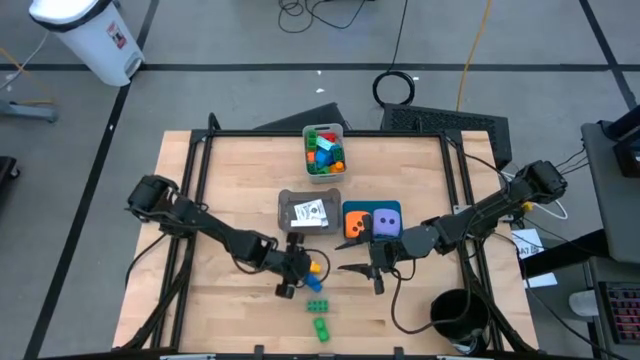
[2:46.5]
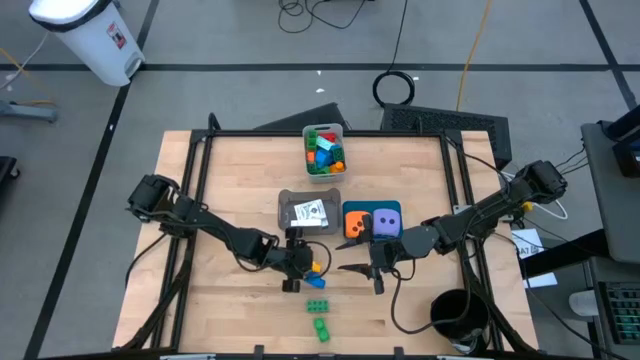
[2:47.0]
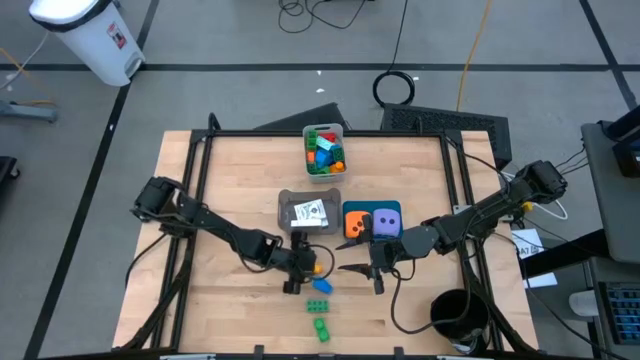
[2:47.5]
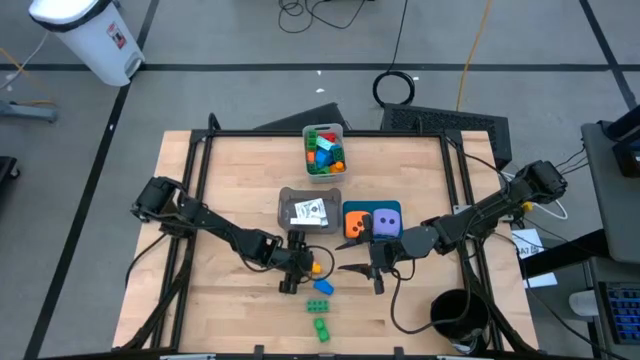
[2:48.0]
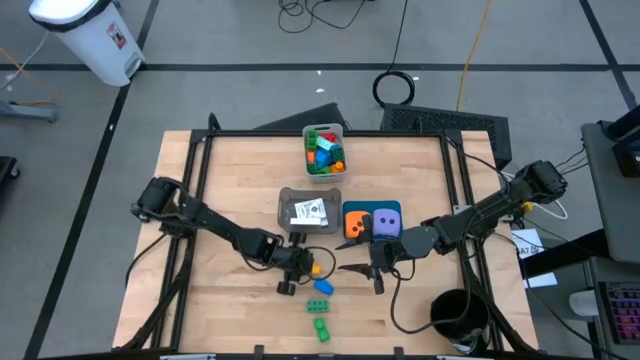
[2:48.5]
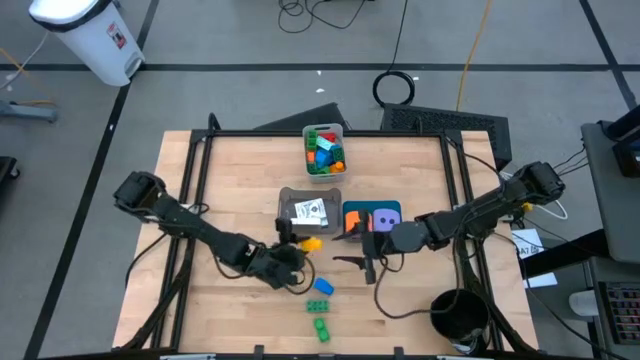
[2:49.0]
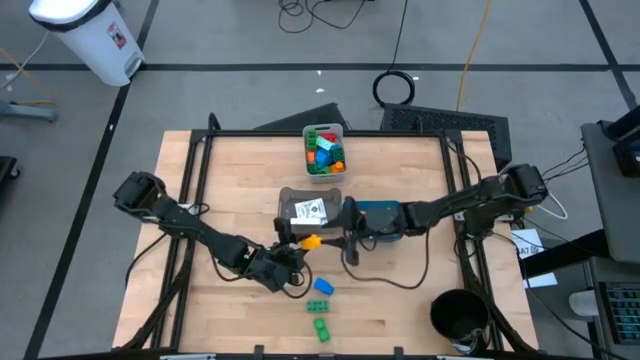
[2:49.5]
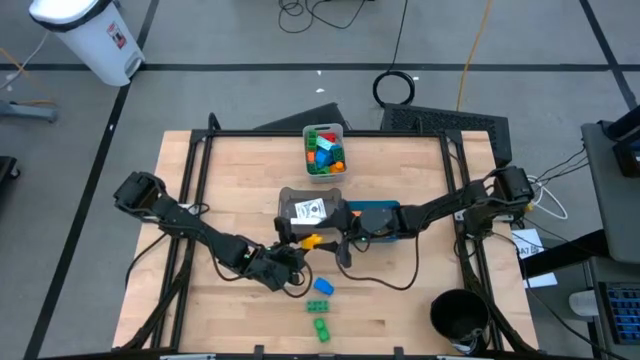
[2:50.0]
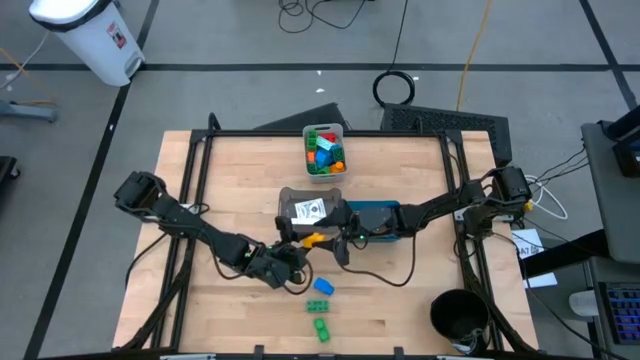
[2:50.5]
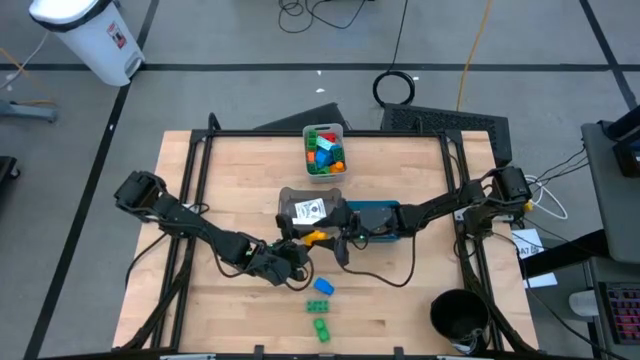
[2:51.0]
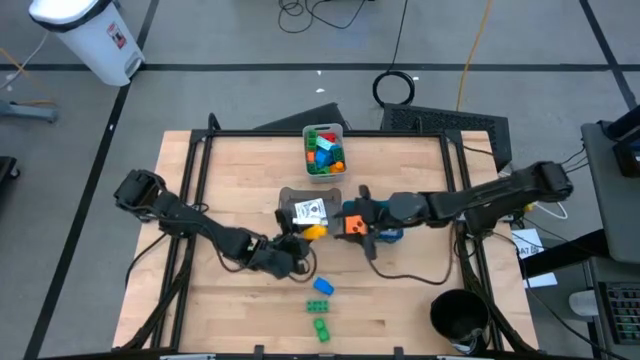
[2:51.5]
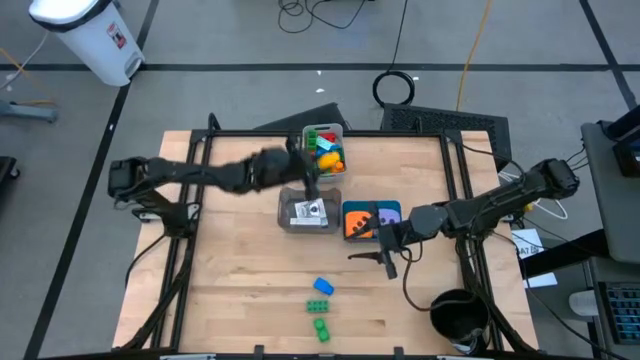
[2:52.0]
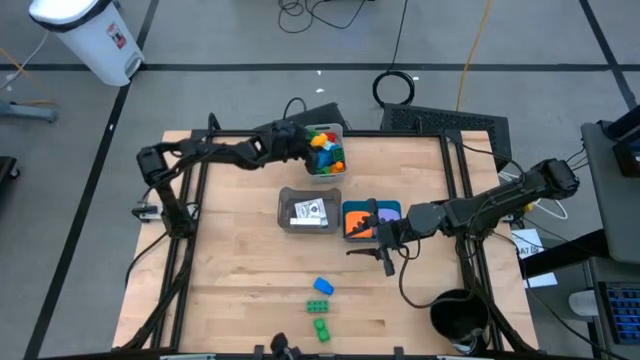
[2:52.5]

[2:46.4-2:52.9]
Task: Pick & Place Toys
Put the yellow game piece into the gray bin

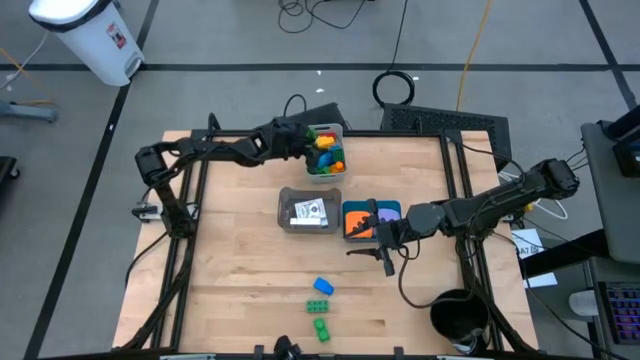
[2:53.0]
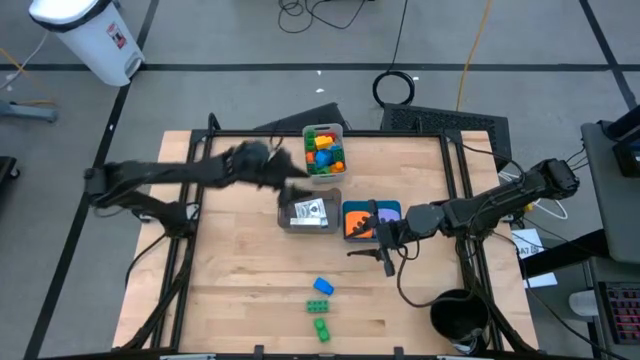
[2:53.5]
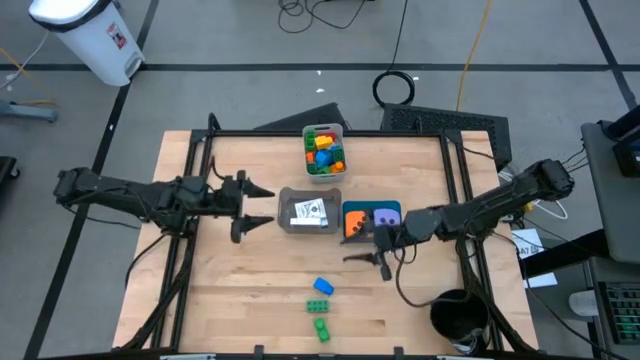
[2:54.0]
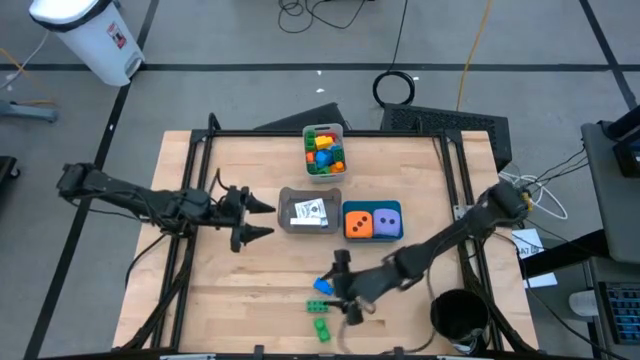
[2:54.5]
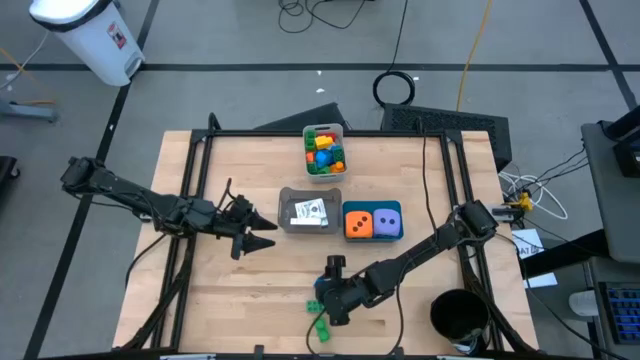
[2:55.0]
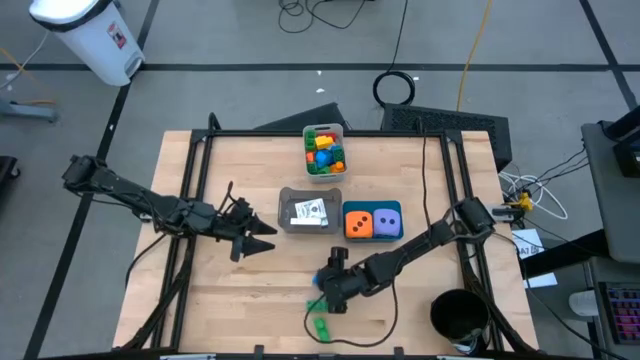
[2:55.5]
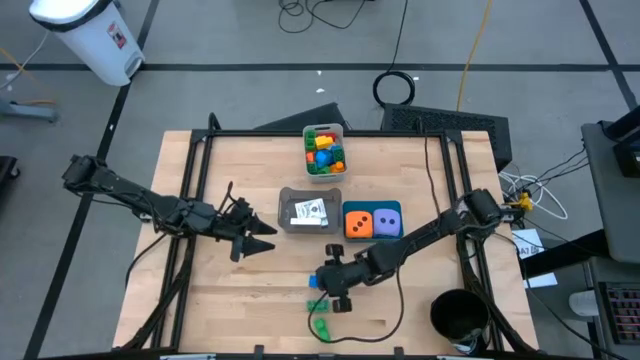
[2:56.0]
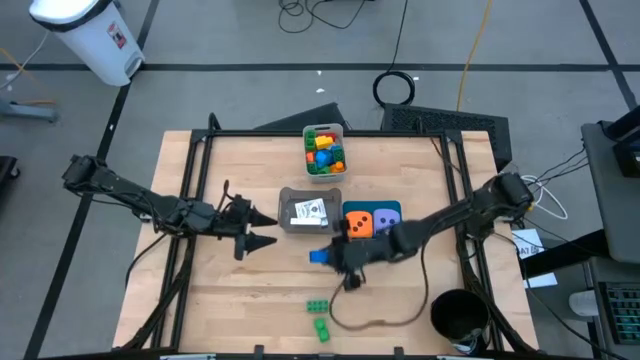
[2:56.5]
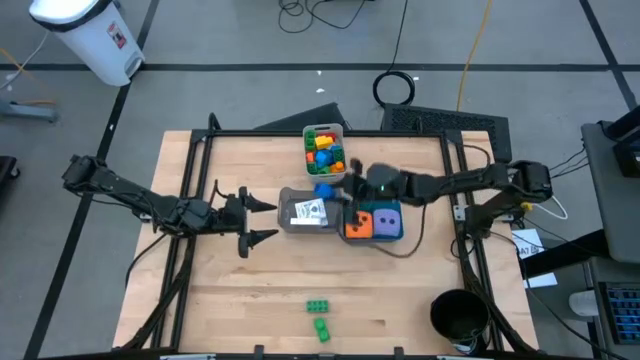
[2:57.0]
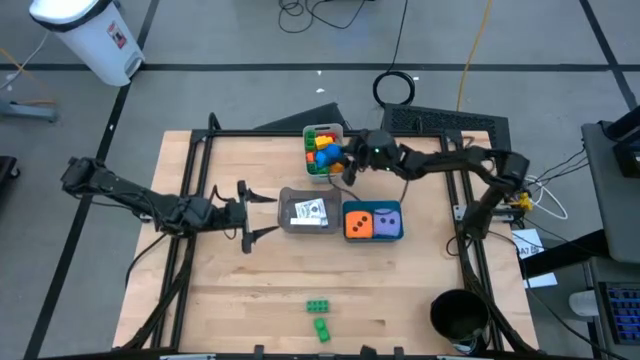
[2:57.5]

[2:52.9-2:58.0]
Put the blue game piece into the gray bin

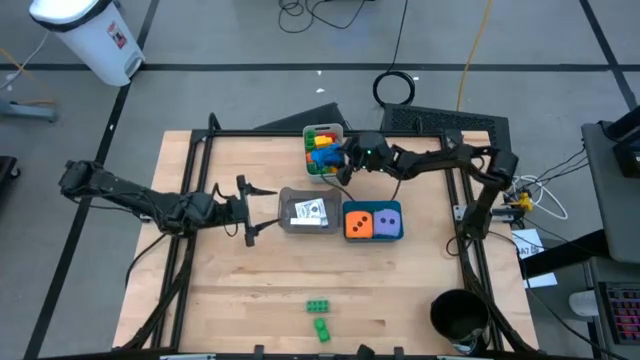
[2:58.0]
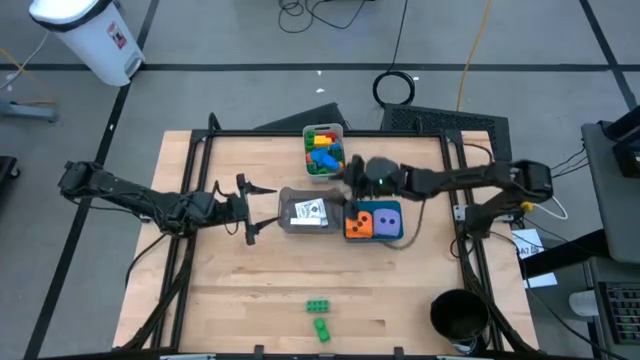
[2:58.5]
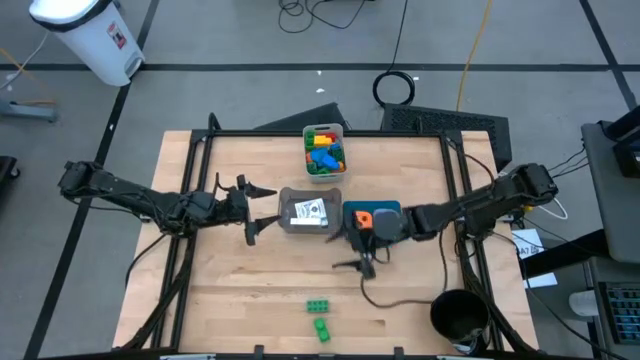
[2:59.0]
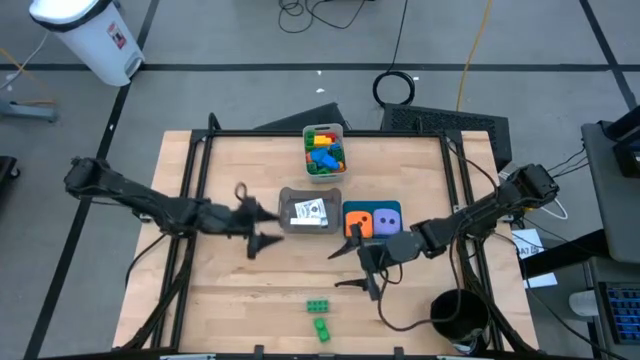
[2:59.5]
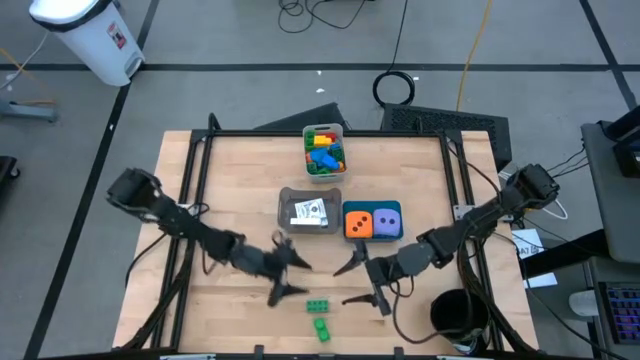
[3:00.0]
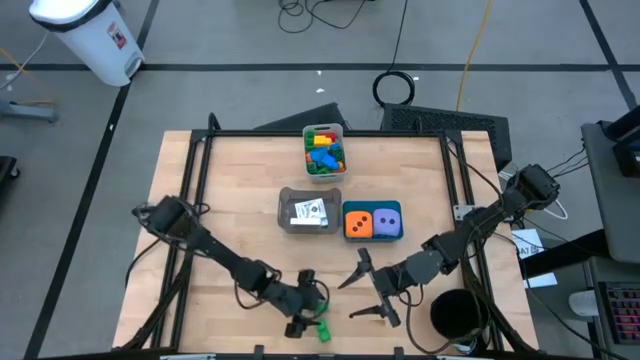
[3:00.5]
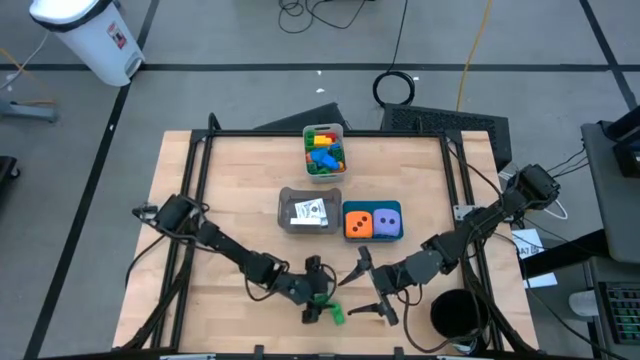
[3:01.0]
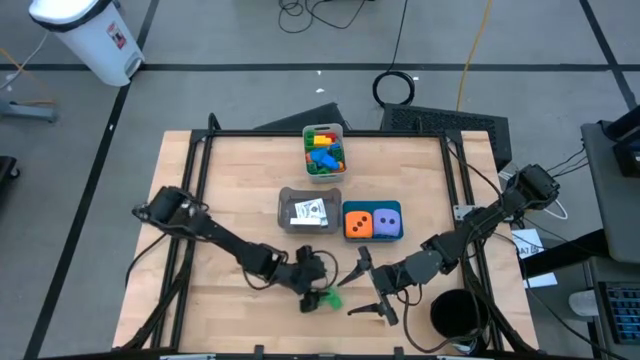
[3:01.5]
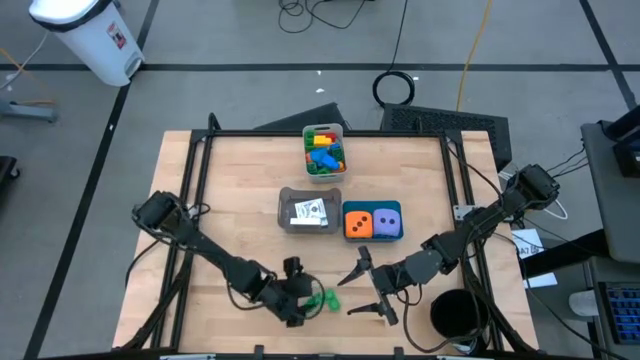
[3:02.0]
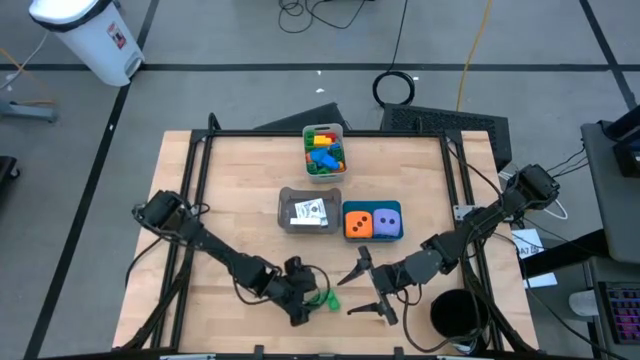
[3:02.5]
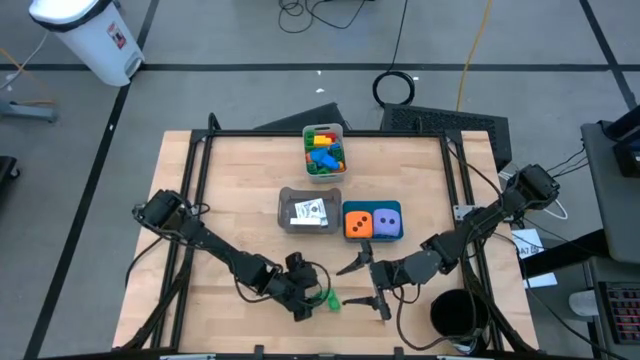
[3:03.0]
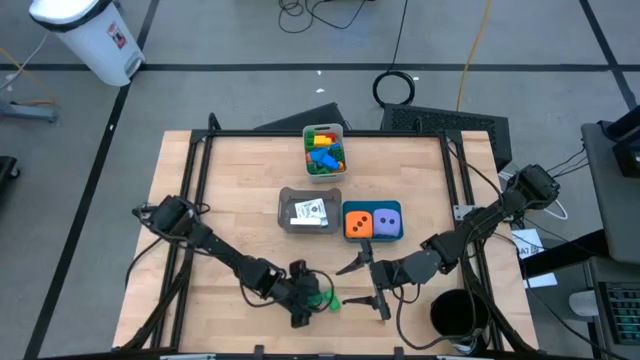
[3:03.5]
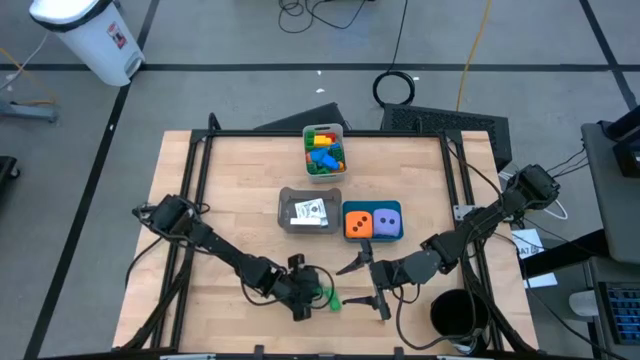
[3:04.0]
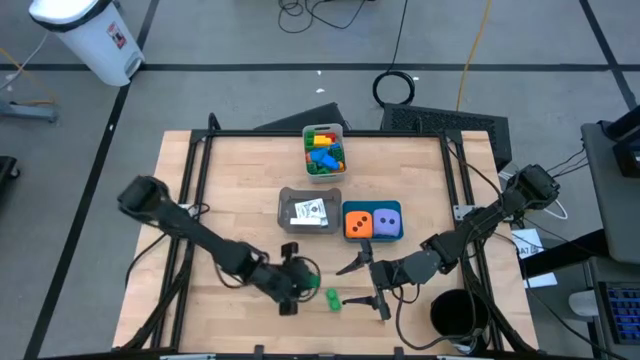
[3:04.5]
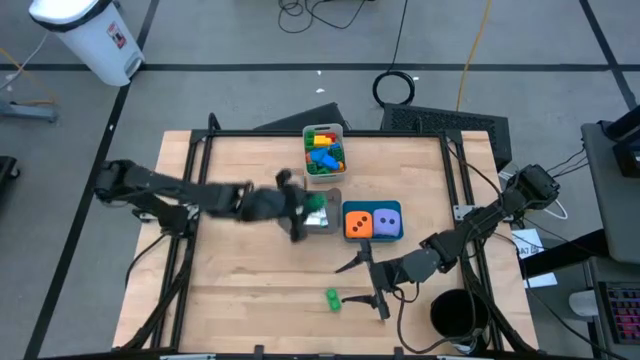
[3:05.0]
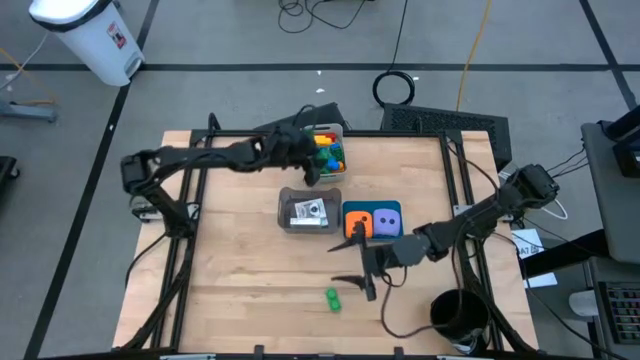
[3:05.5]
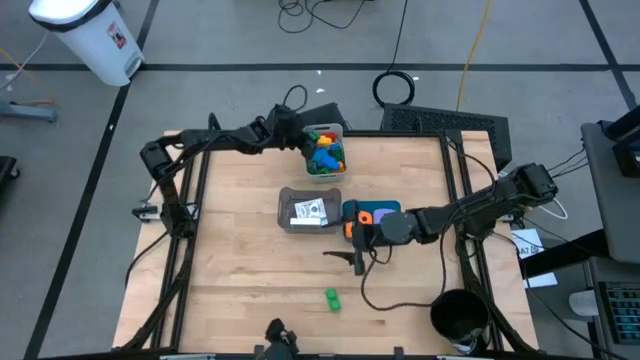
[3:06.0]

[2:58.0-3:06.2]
Put the green game piece into the gray bin

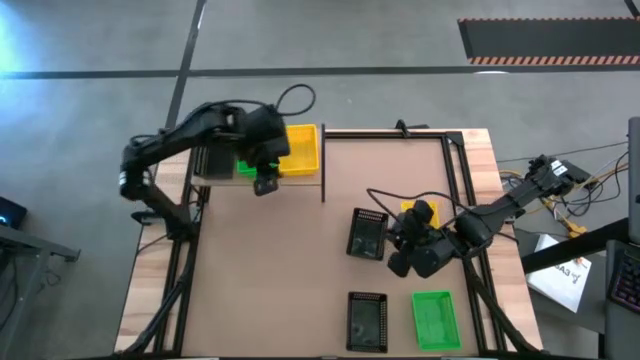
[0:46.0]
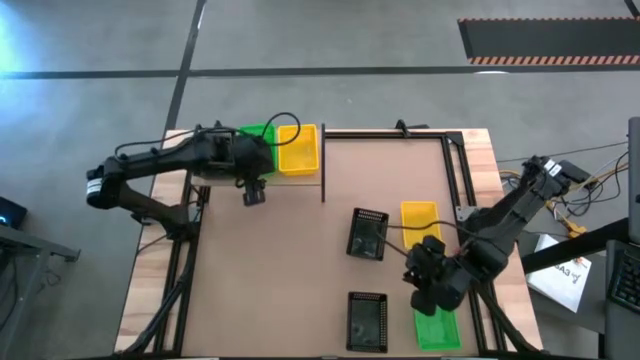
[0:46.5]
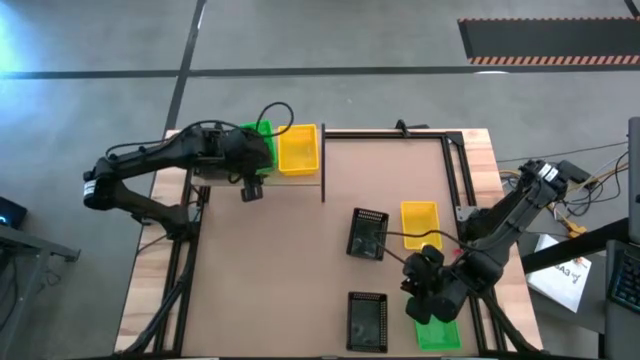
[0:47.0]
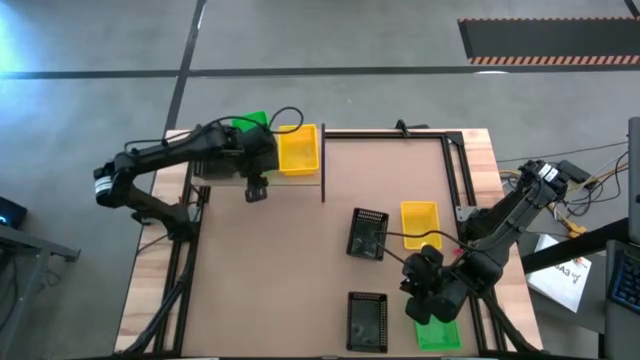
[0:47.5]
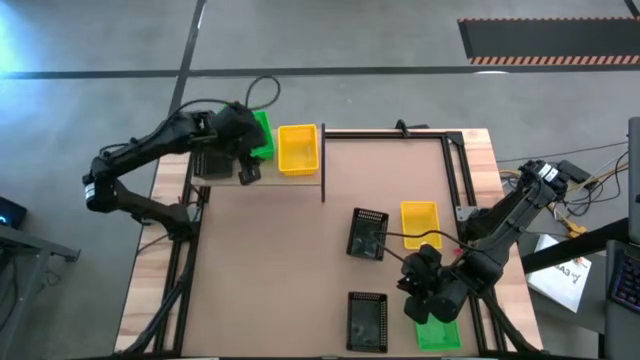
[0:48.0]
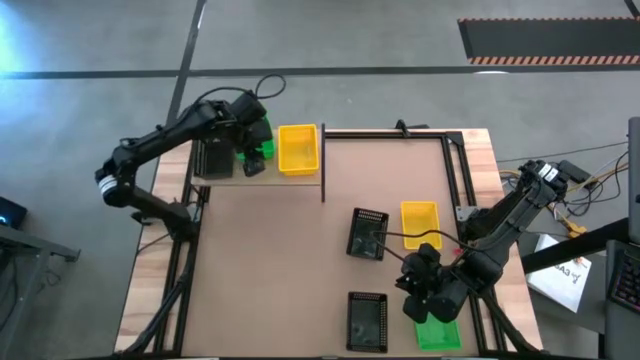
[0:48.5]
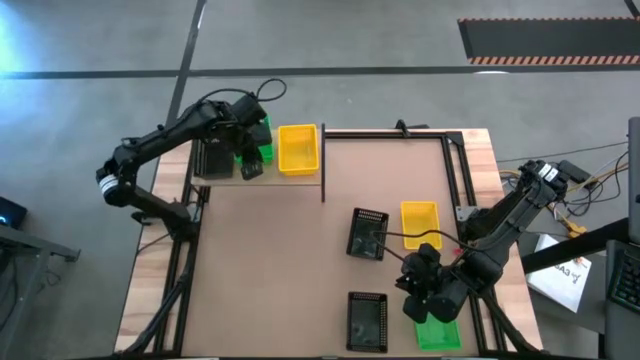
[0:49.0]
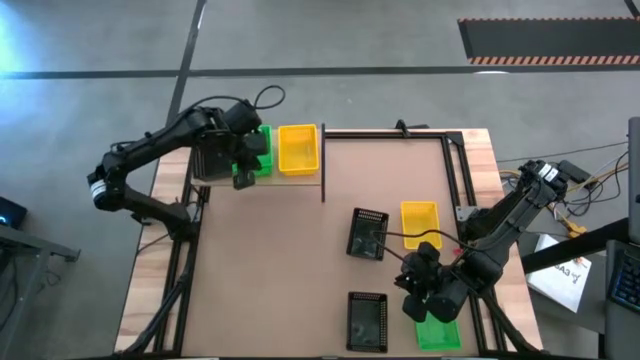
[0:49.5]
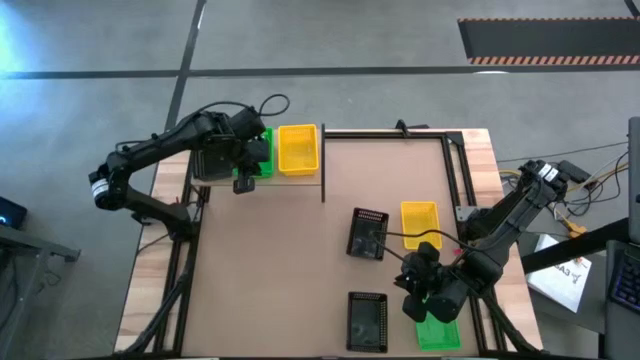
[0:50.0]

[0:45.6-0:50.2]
Task: Stack baskets on shelf by color
Adjust the green bins on the shelf
